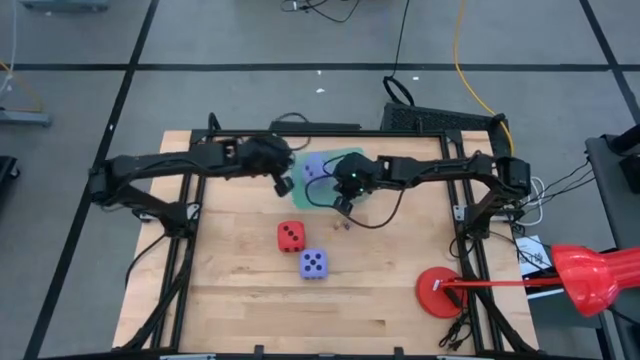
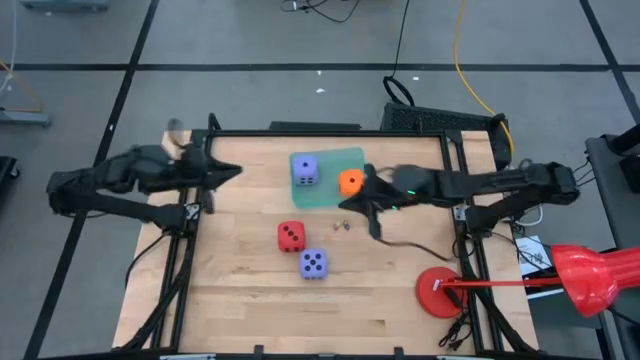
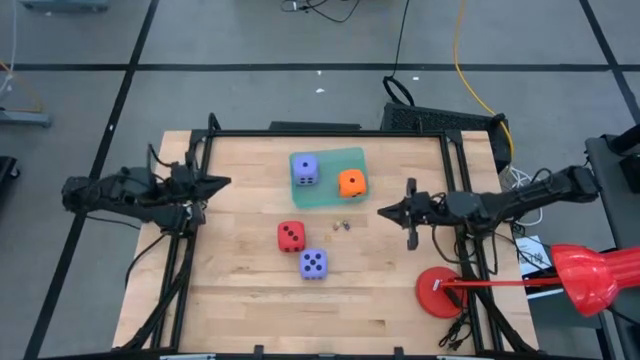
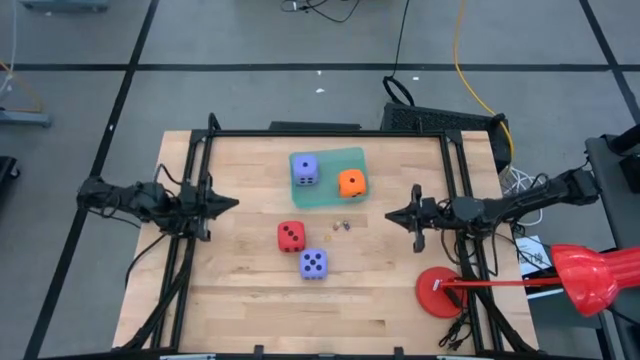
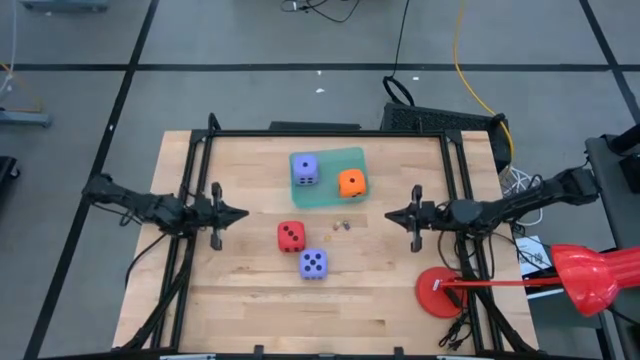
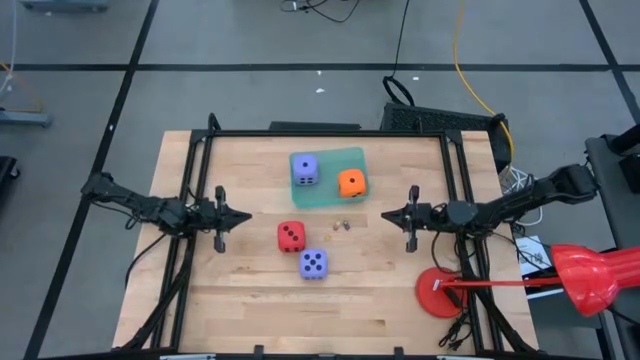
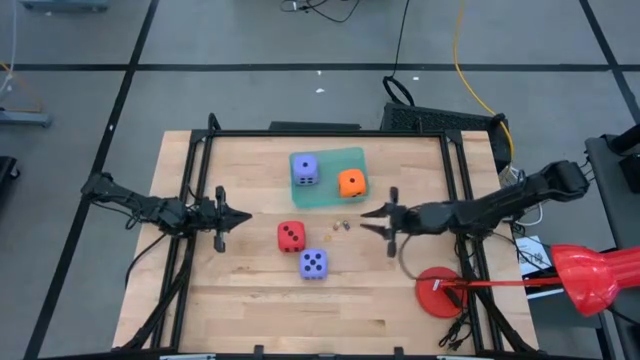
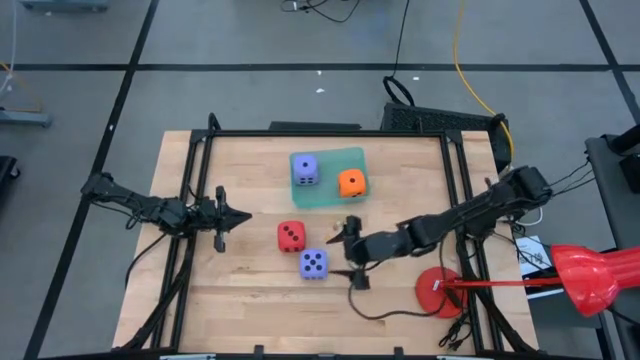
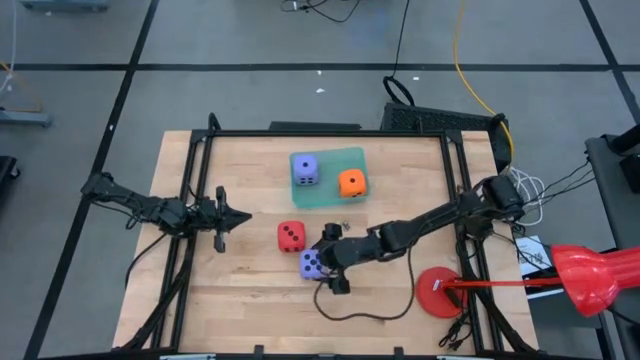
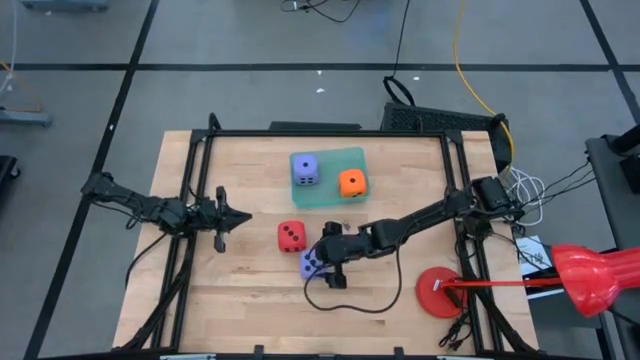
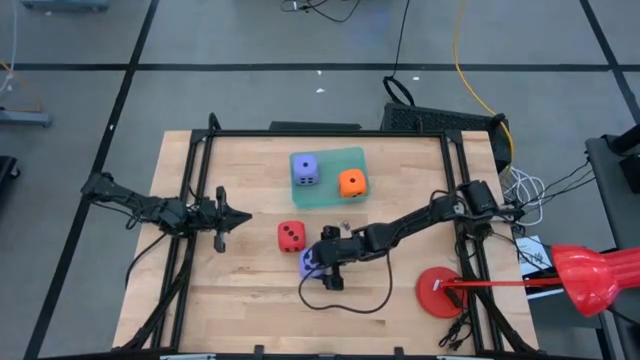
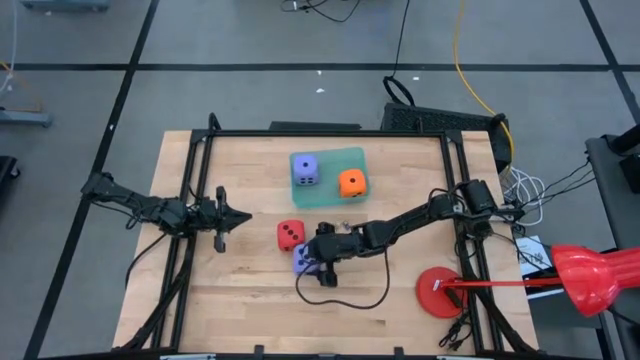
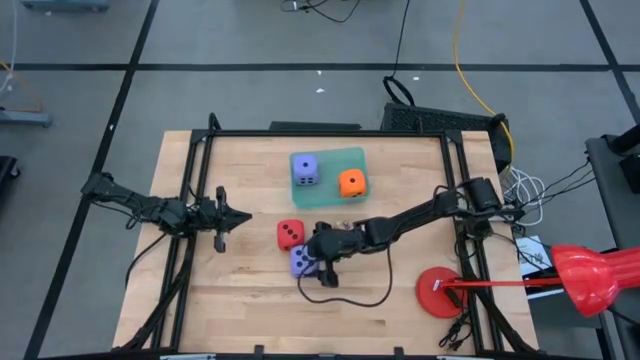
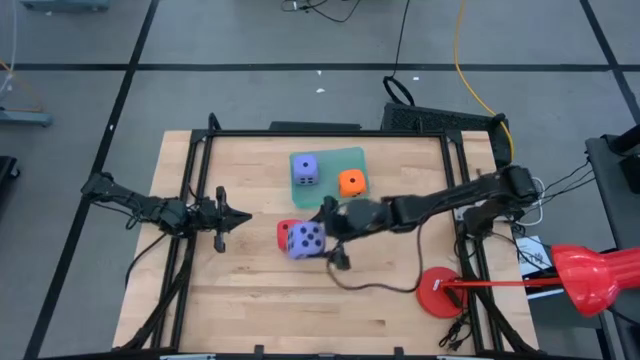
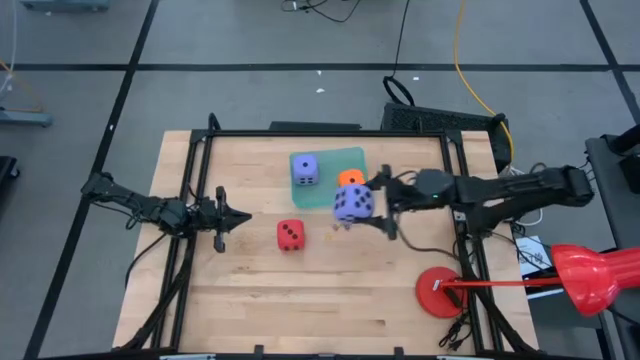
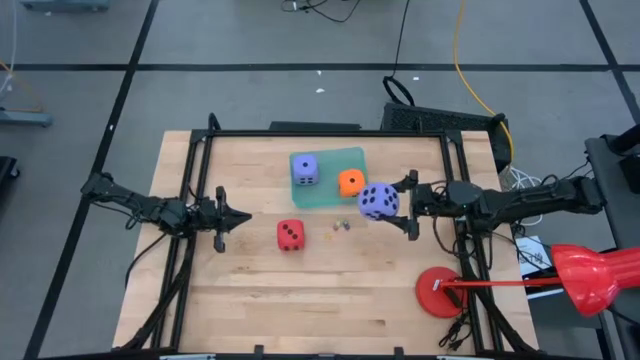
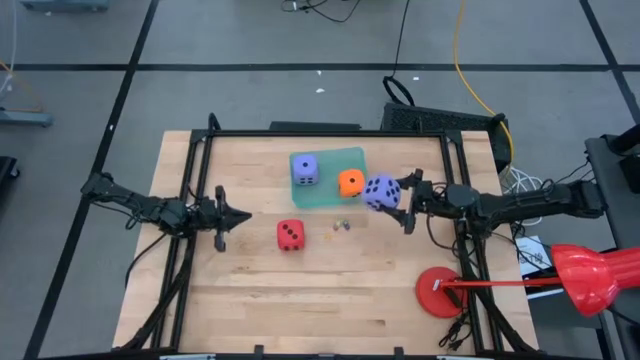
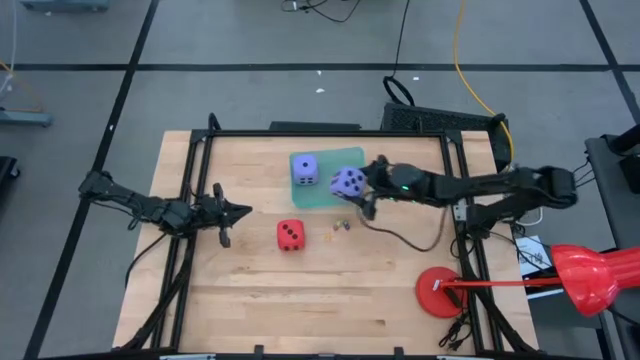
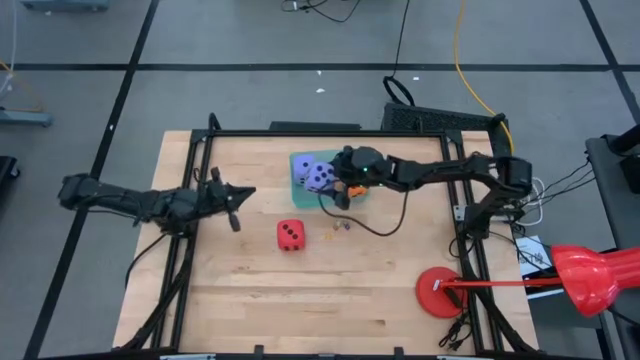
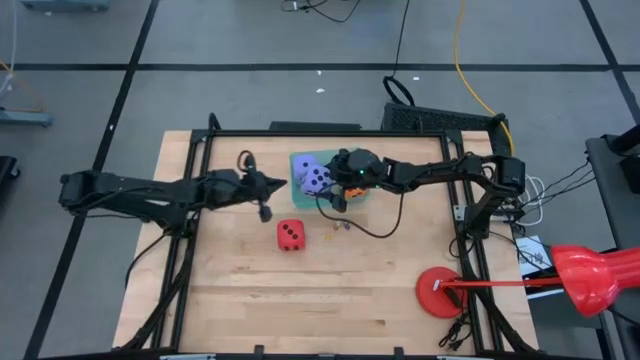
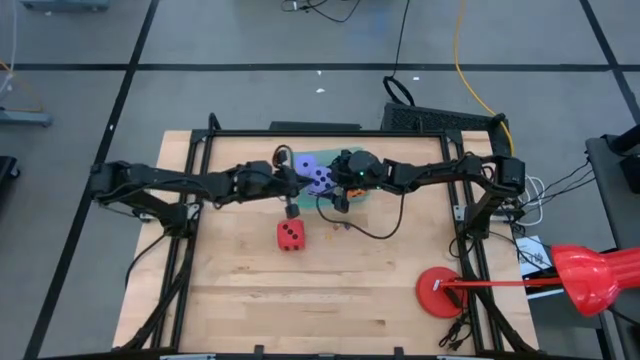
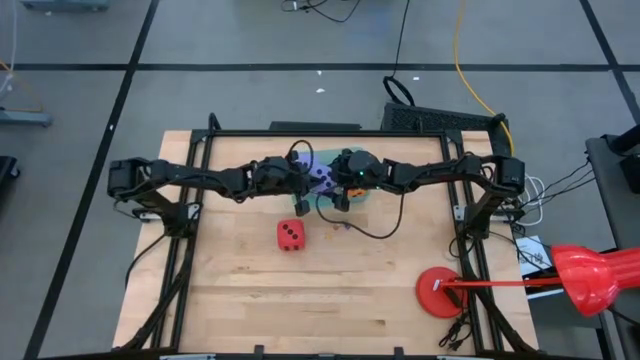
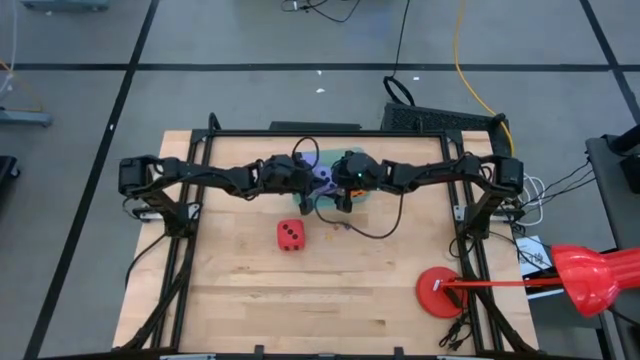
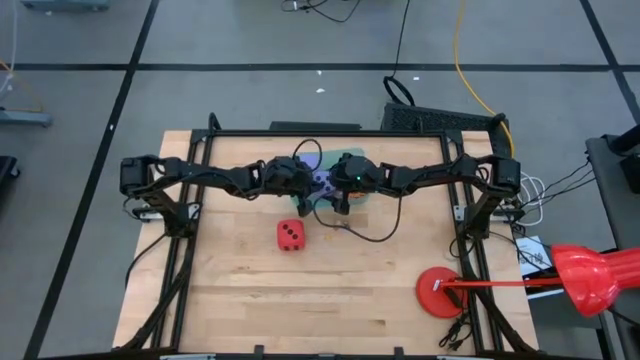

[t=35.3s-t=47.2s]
Task: Pick & Place Dice
Put the large blue dice into the basket

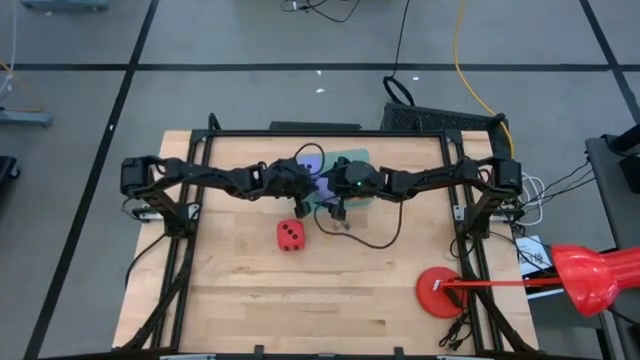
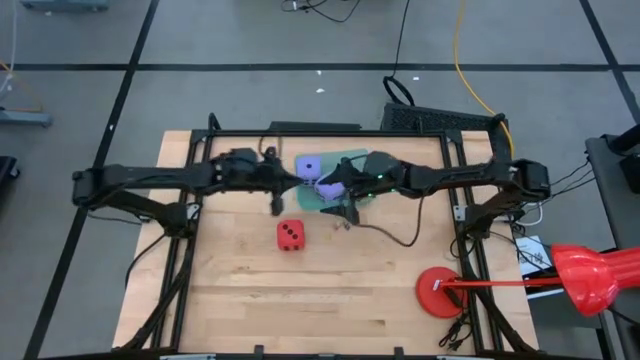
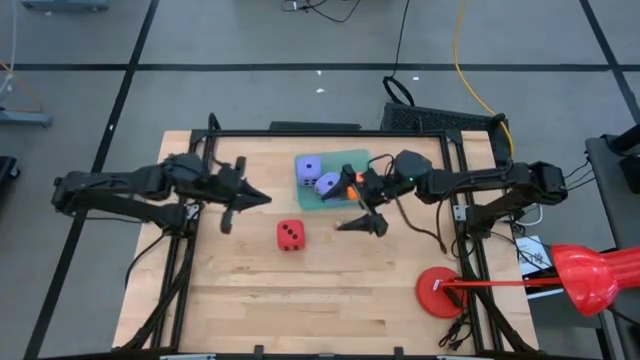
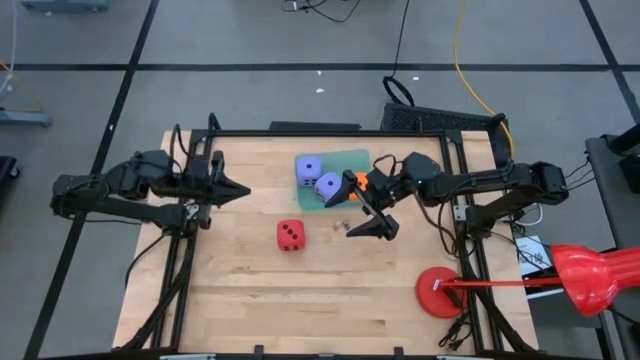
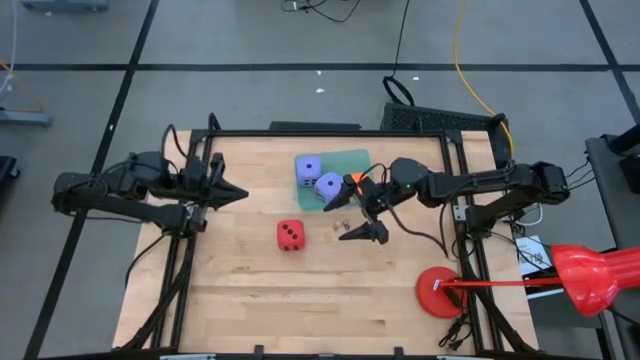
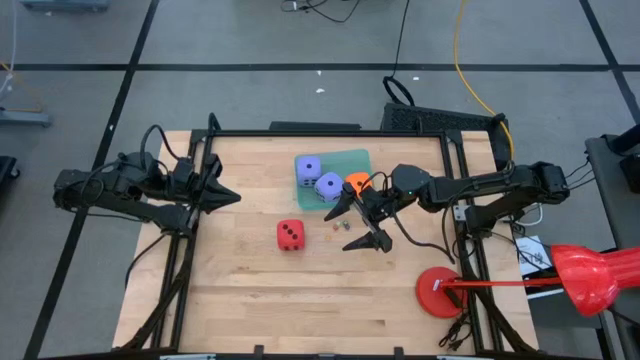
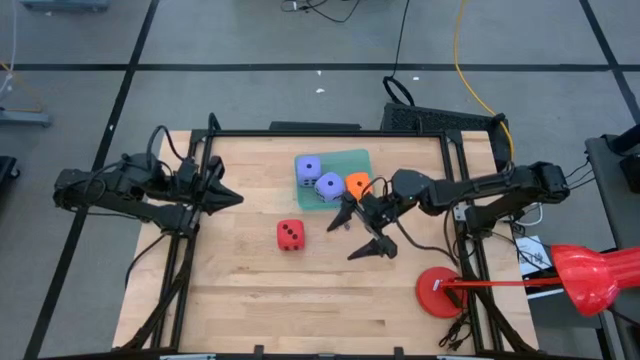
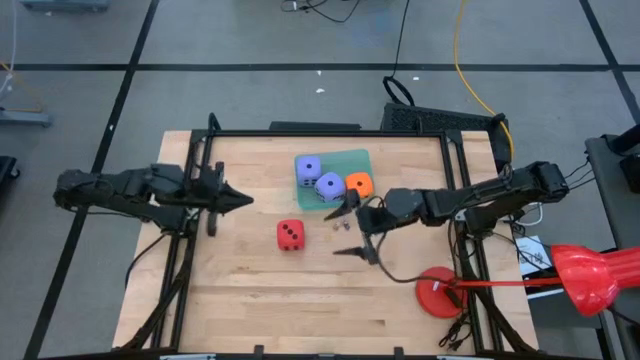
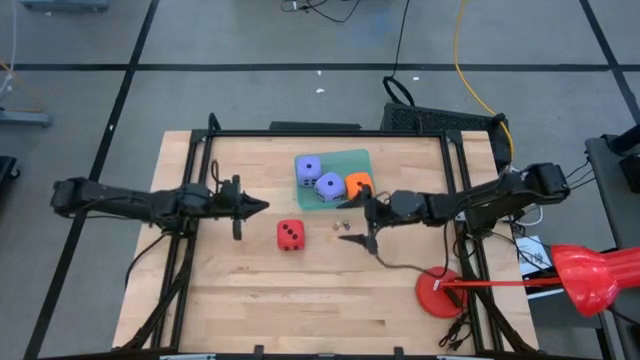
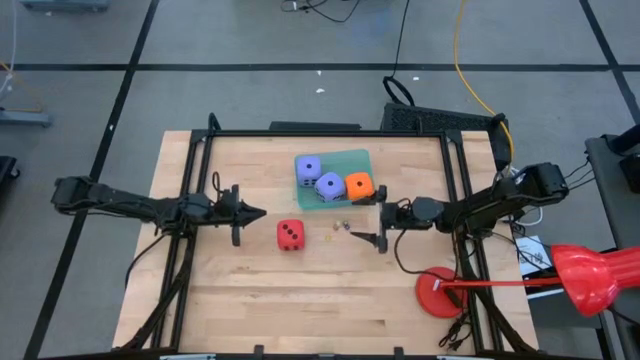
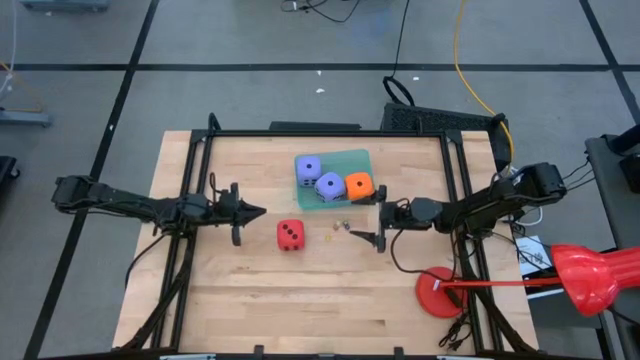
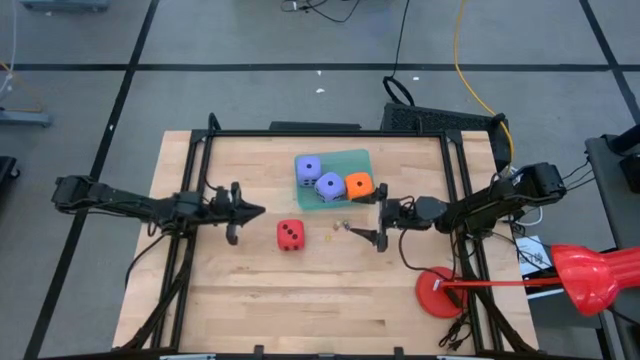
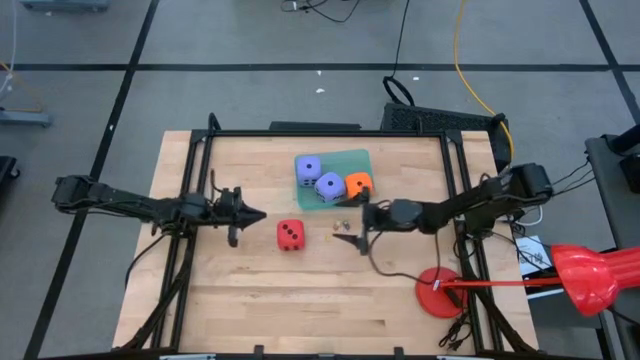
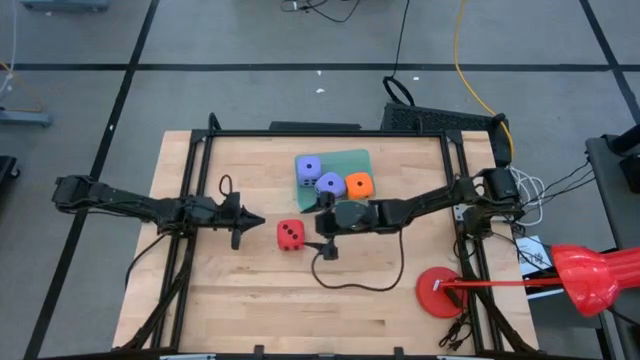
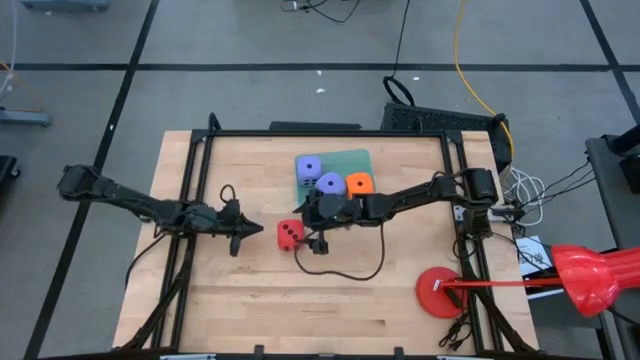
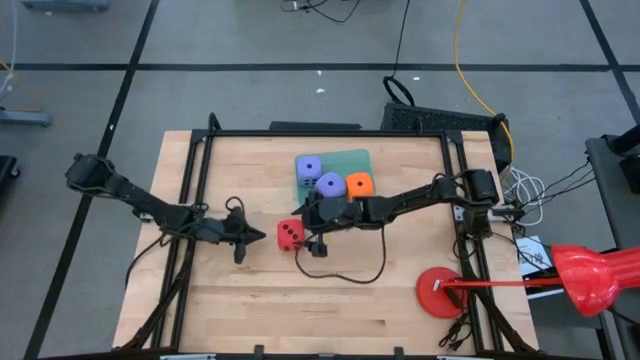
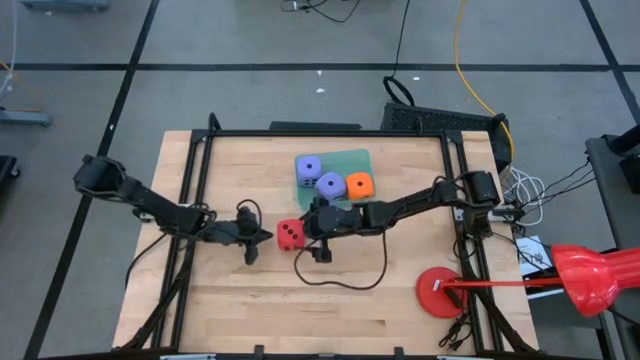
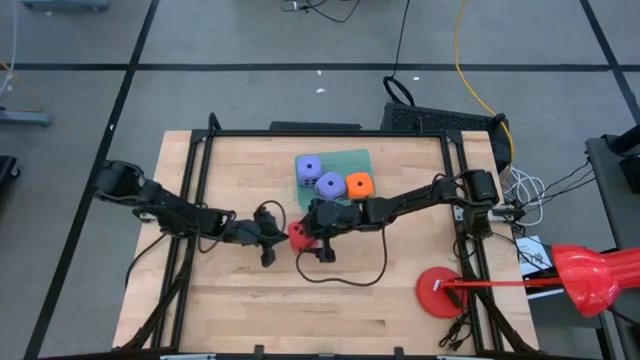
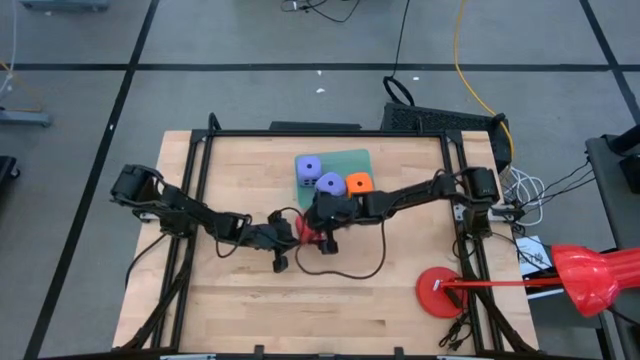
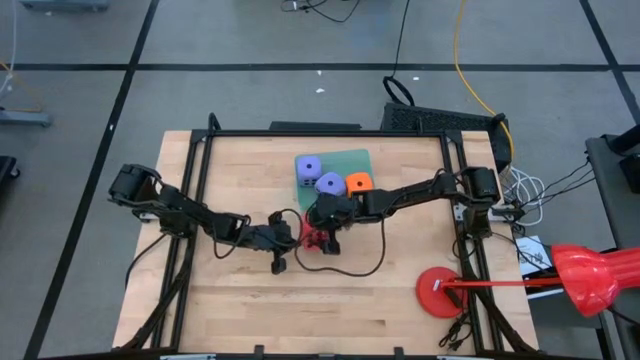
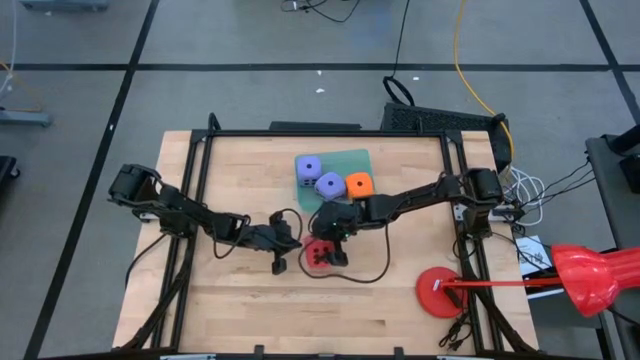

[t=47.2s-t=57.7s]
Put the large red dice into the basket
